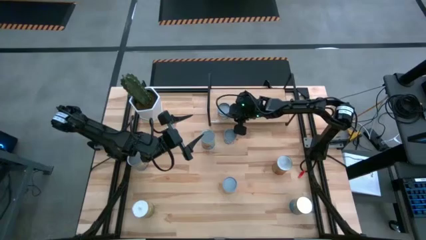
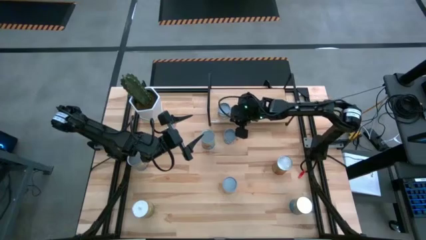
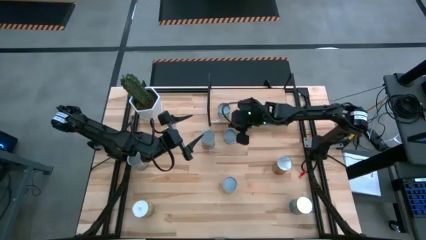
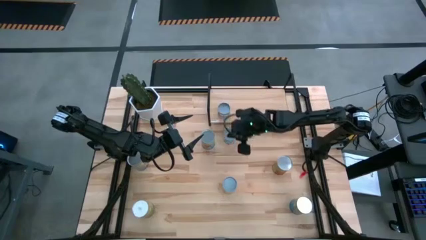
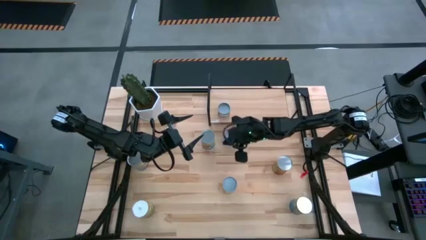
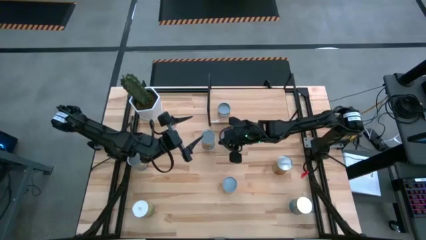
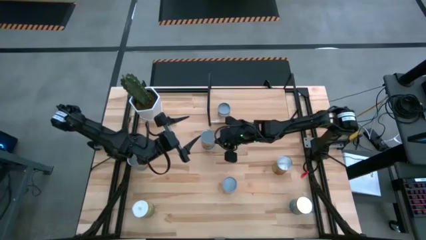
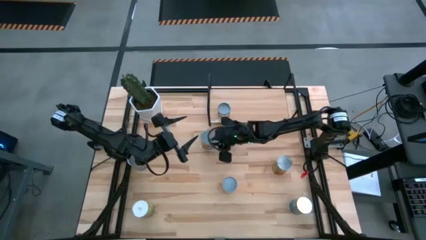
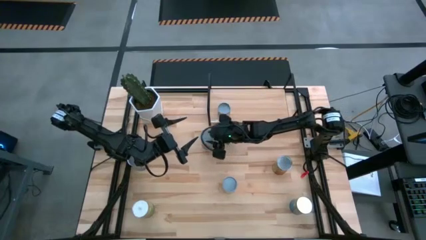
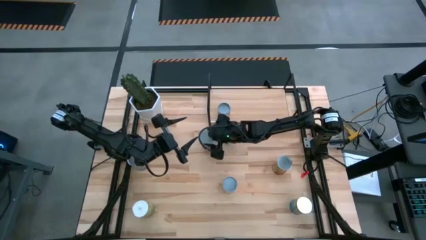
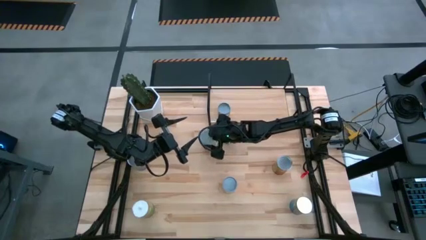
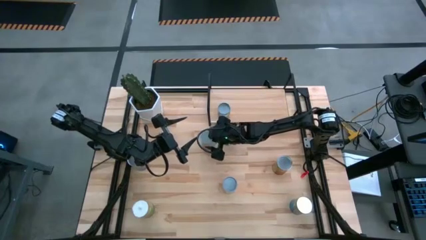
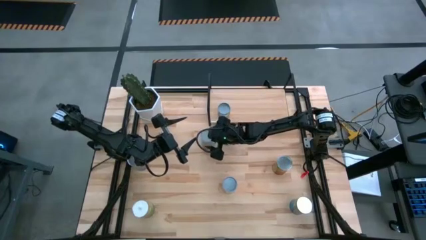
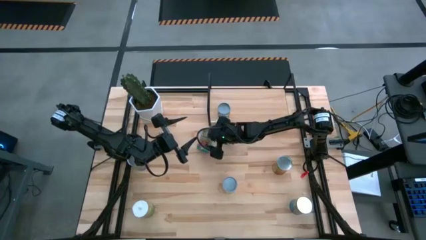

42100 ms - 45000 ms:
Task: Pick and place cans onto a shelf
Put the canned tomatoes on the shelf

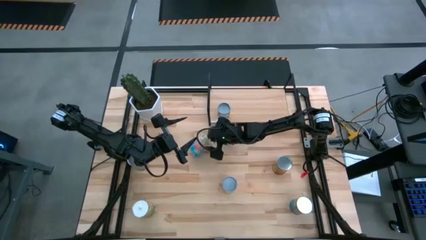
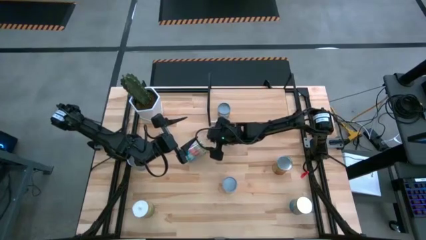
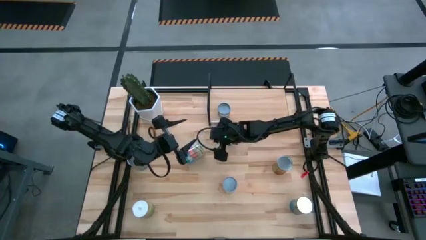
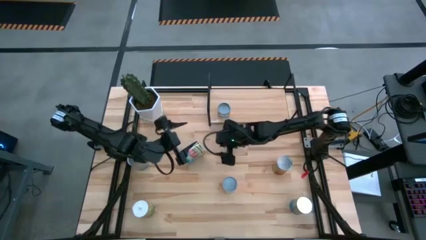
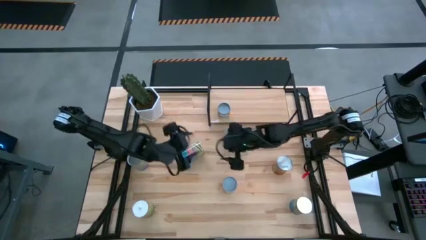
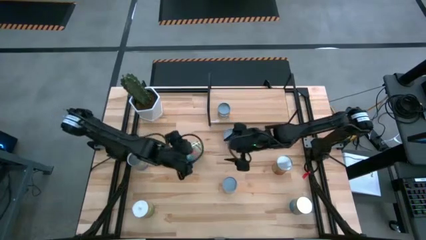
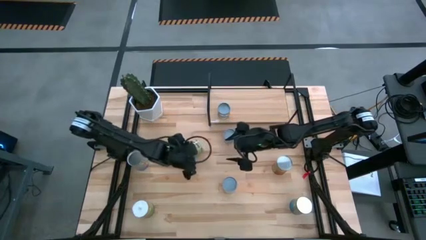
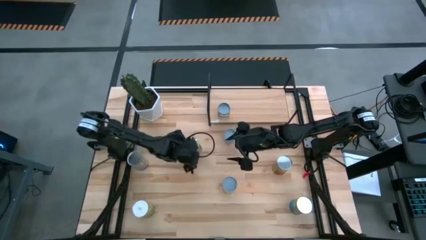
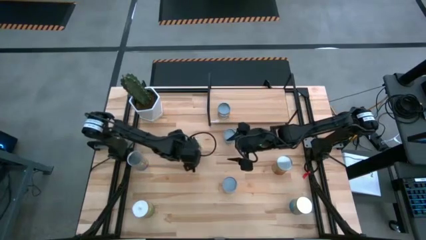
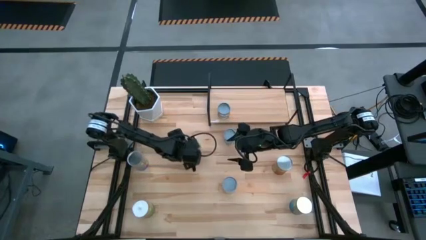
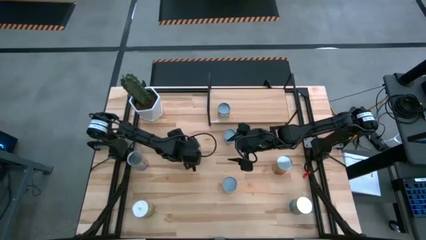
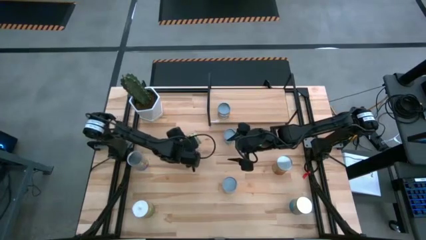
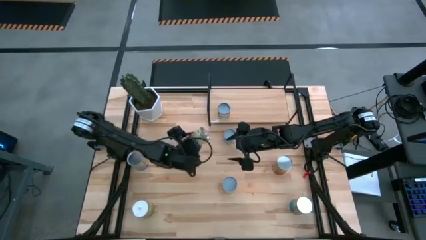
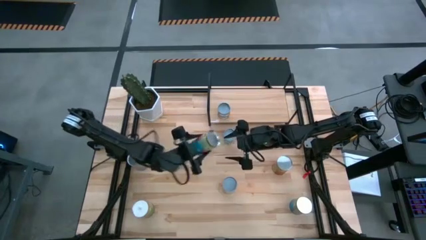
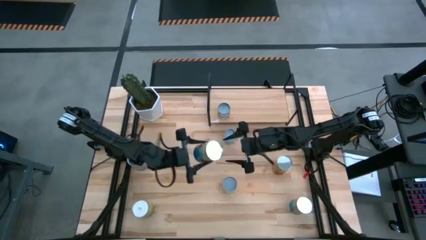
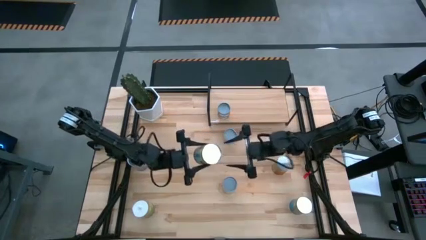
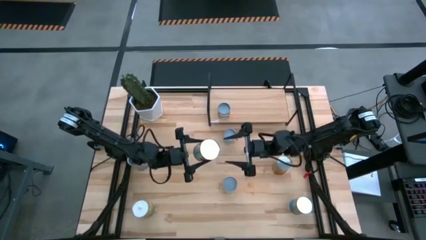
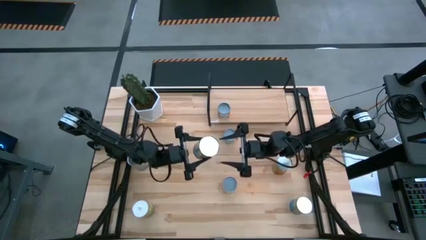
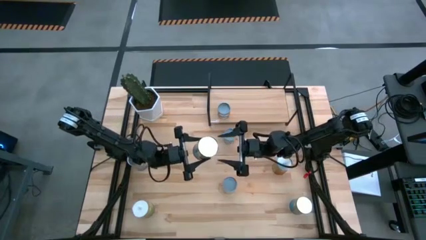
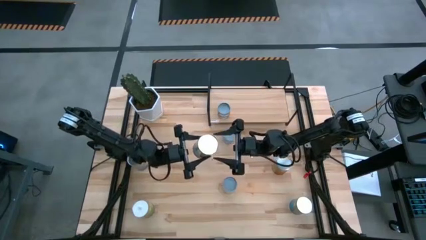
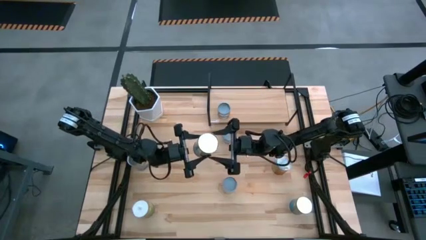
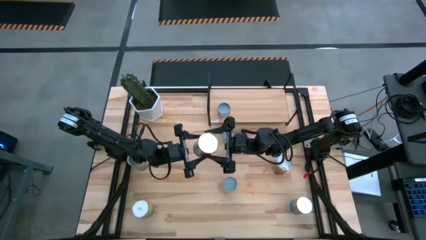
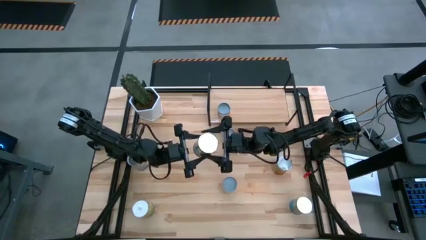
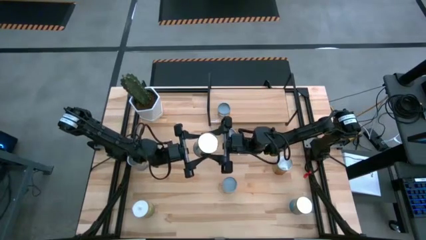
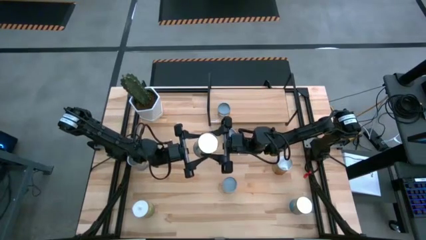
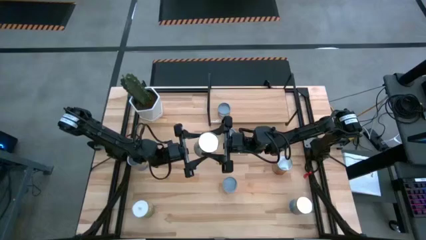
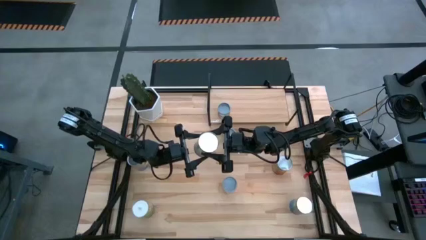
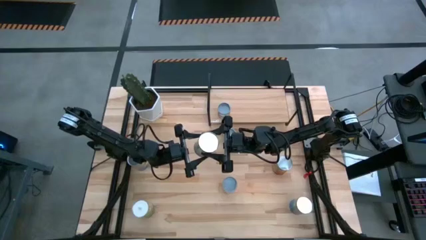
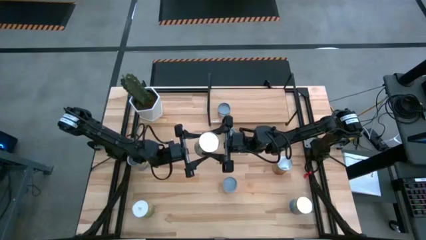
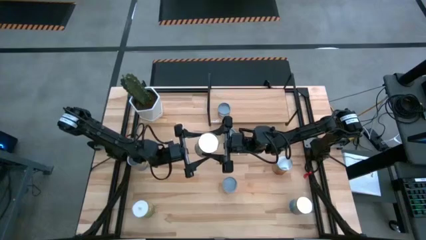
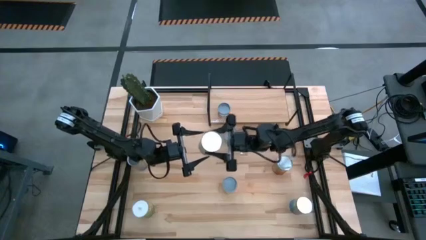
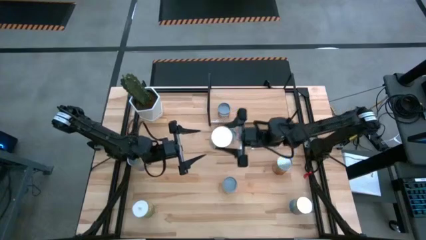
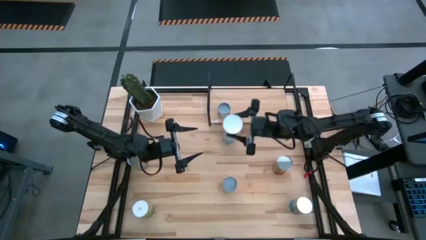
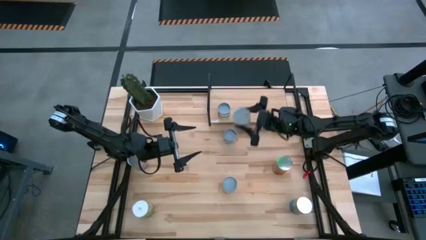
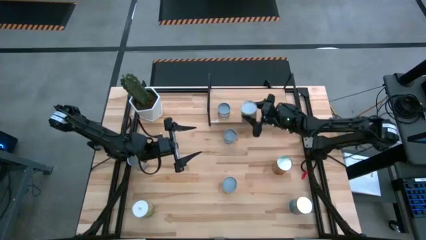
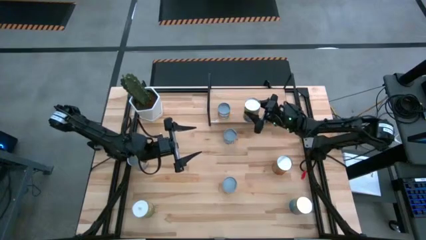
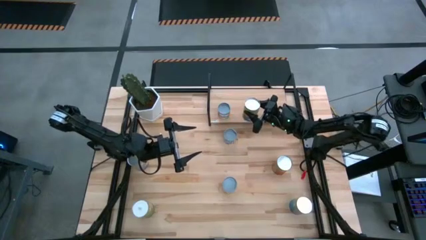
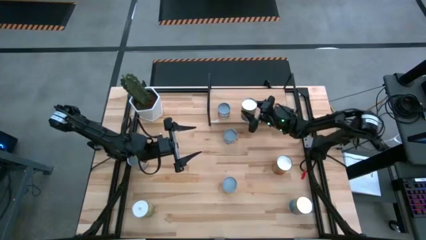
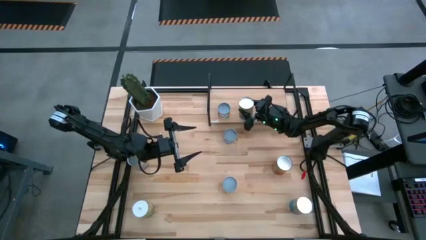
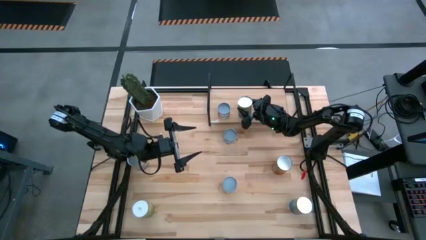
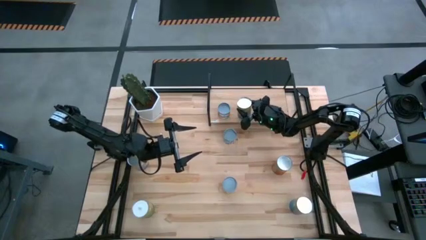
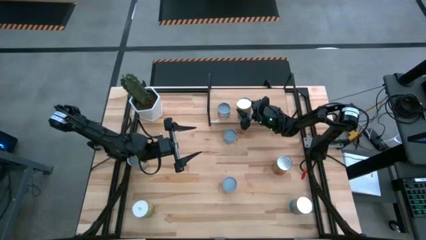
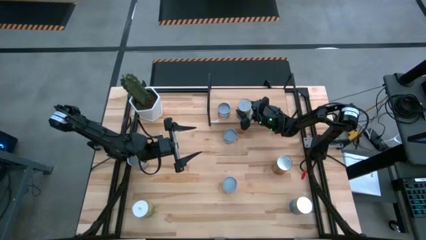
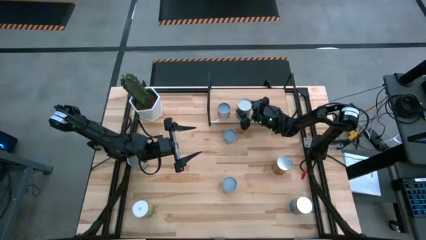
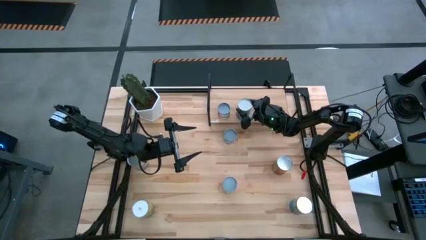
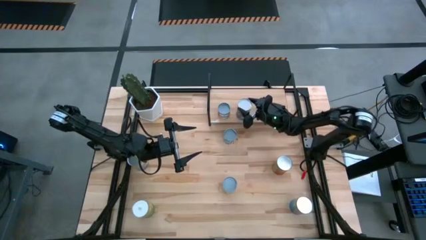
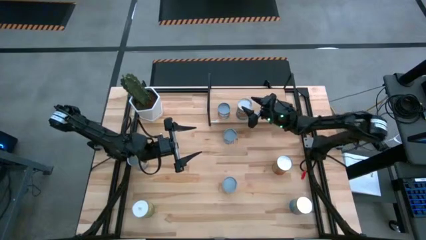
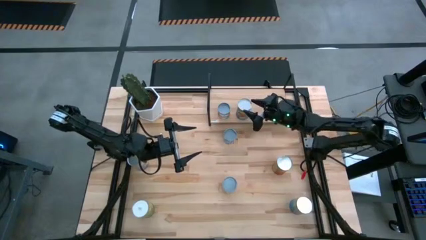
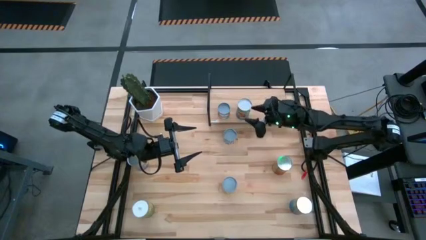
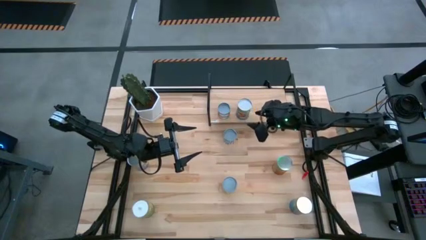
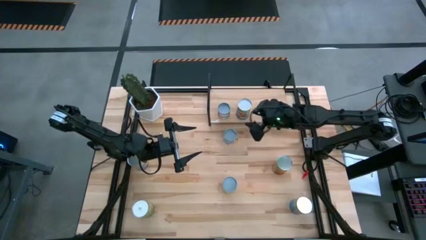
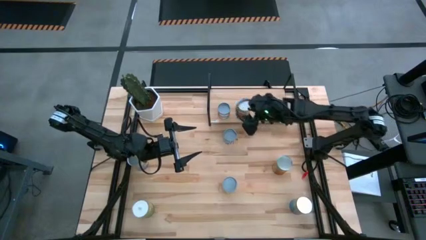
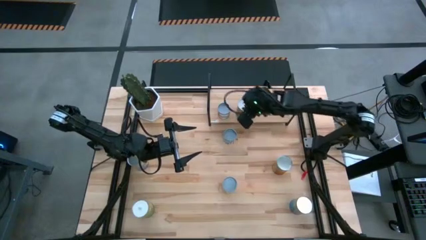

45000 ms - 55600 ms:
Put the canned tomatoes on the shelf
